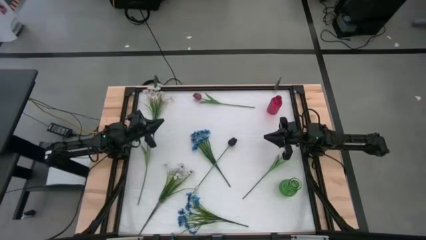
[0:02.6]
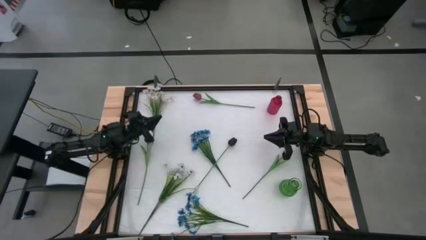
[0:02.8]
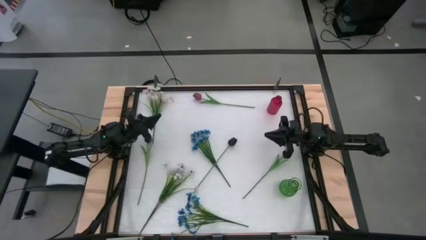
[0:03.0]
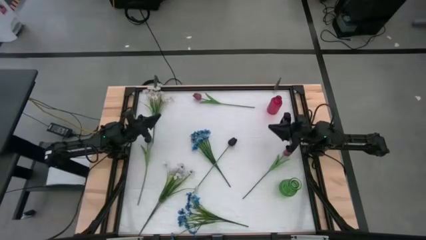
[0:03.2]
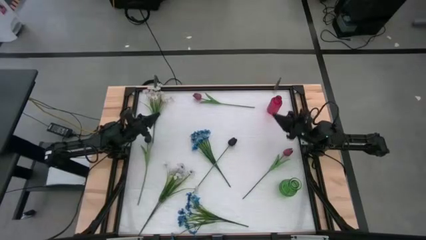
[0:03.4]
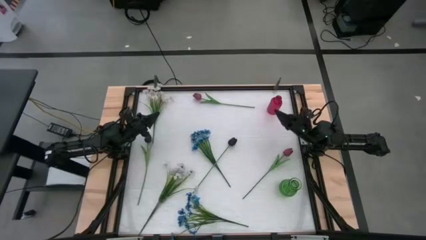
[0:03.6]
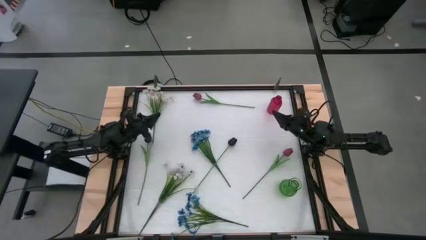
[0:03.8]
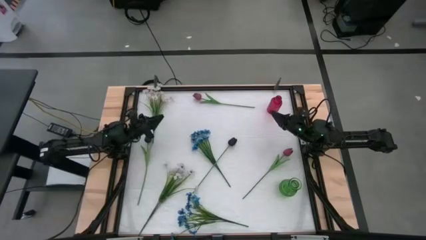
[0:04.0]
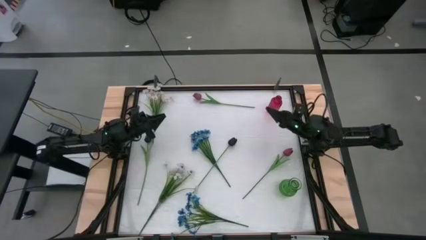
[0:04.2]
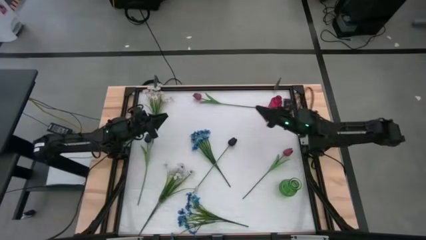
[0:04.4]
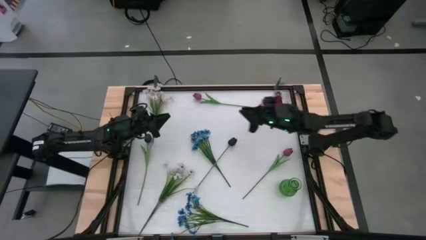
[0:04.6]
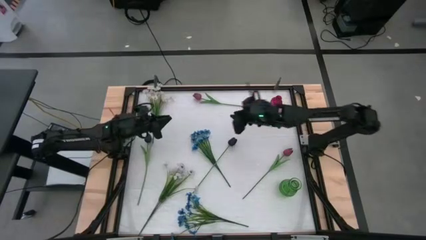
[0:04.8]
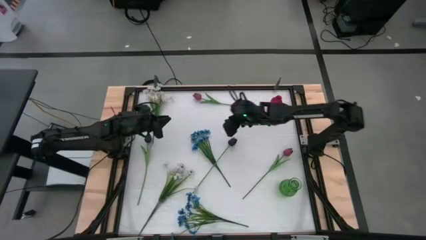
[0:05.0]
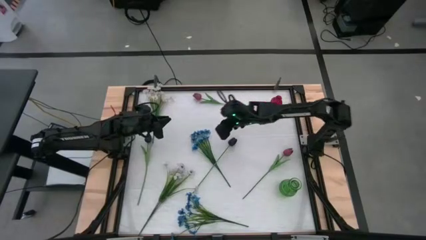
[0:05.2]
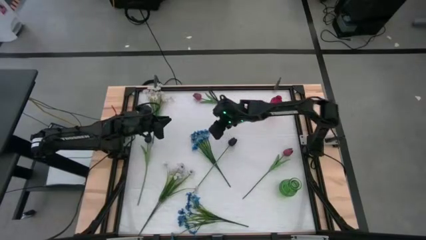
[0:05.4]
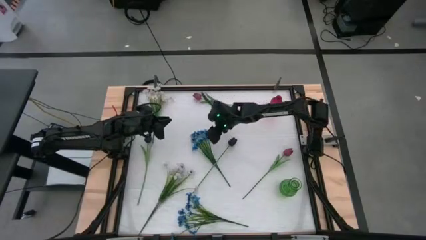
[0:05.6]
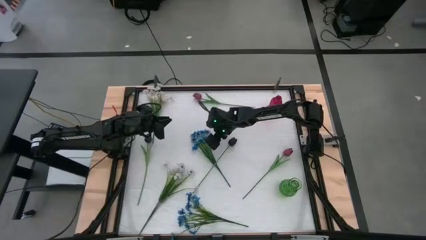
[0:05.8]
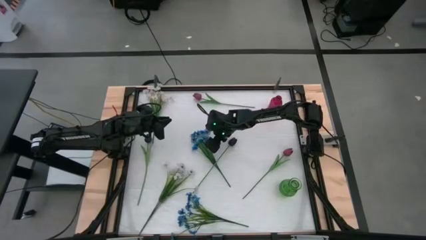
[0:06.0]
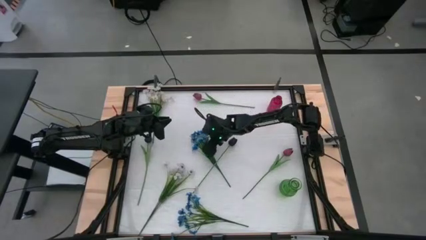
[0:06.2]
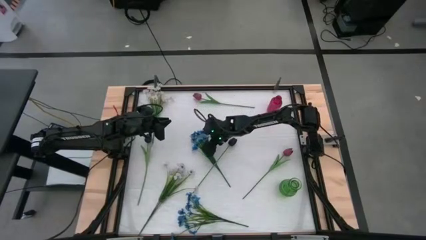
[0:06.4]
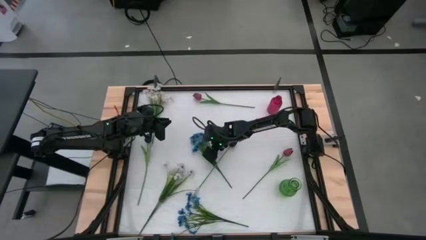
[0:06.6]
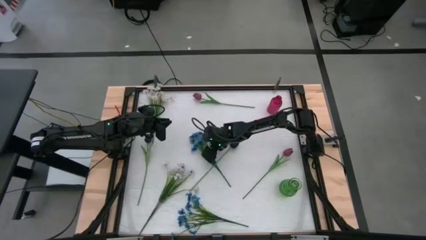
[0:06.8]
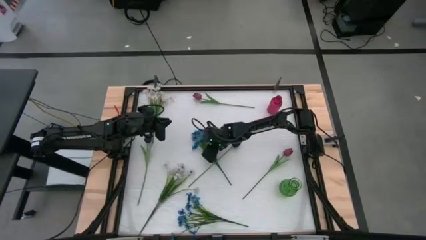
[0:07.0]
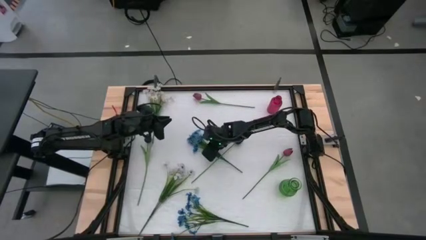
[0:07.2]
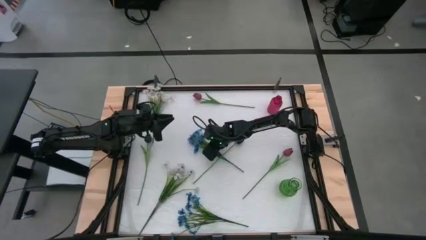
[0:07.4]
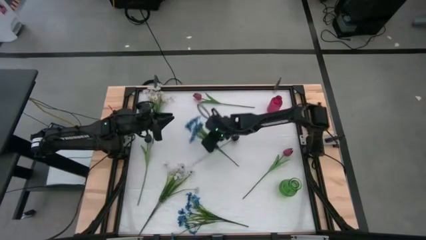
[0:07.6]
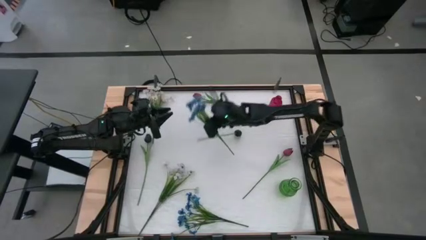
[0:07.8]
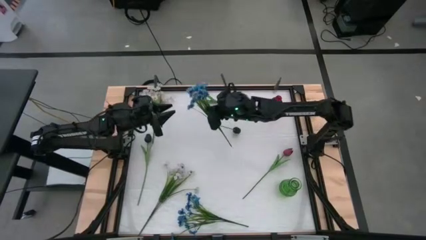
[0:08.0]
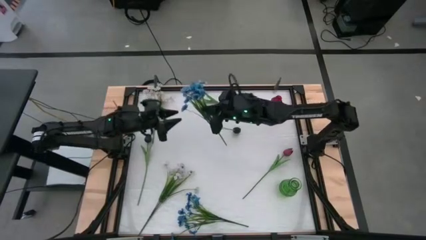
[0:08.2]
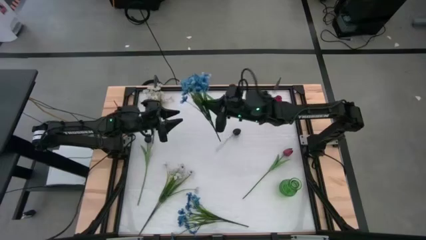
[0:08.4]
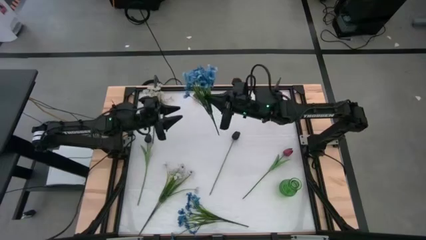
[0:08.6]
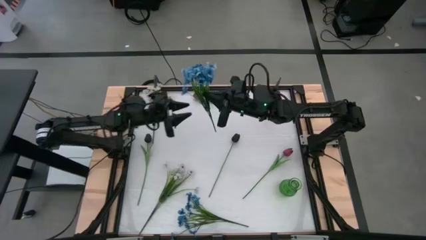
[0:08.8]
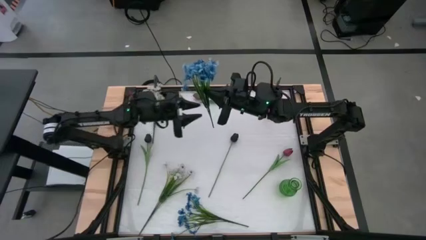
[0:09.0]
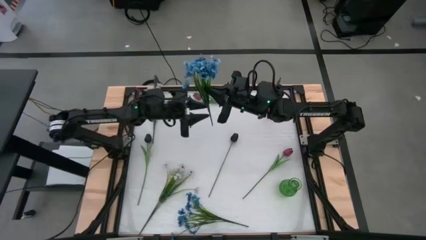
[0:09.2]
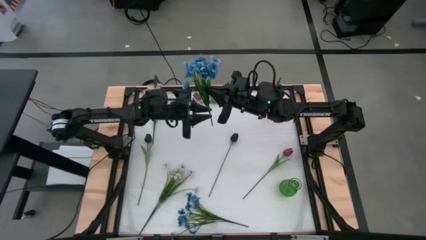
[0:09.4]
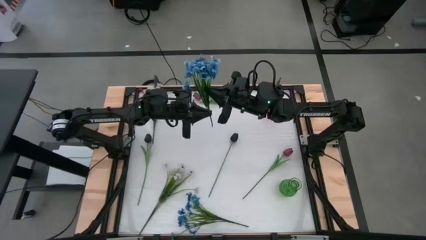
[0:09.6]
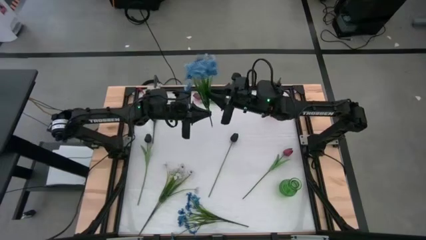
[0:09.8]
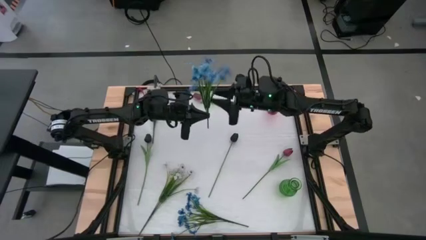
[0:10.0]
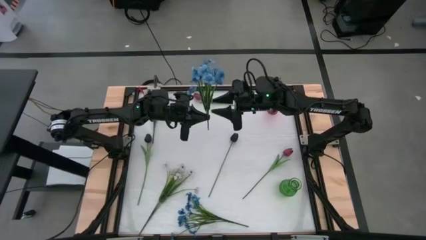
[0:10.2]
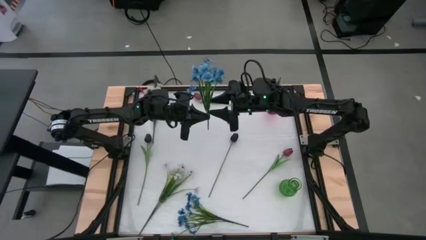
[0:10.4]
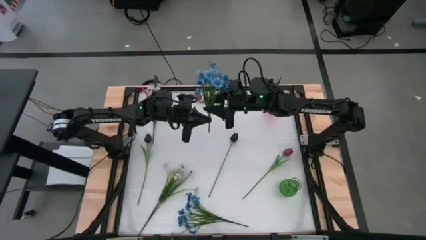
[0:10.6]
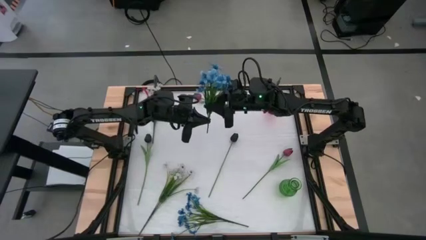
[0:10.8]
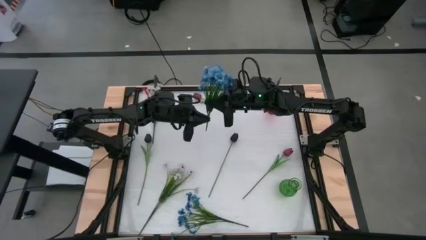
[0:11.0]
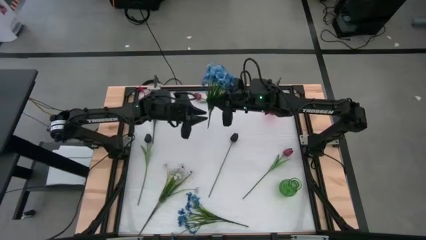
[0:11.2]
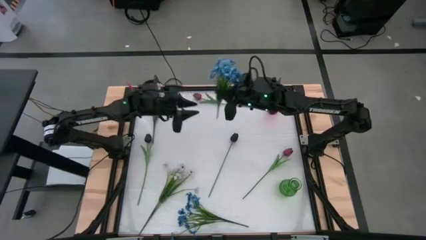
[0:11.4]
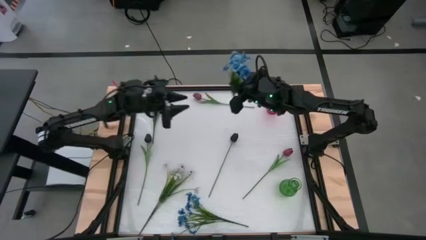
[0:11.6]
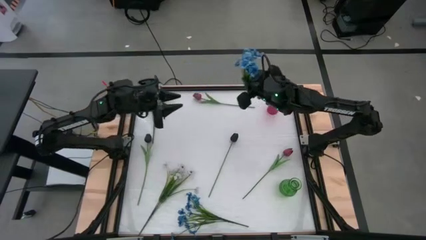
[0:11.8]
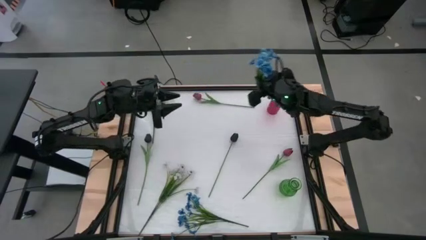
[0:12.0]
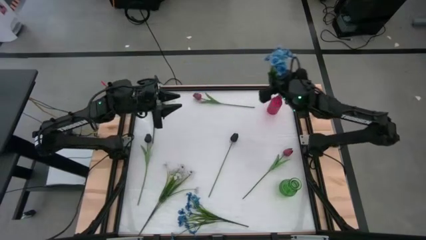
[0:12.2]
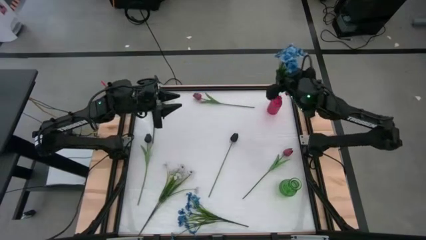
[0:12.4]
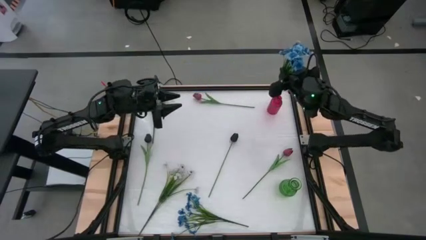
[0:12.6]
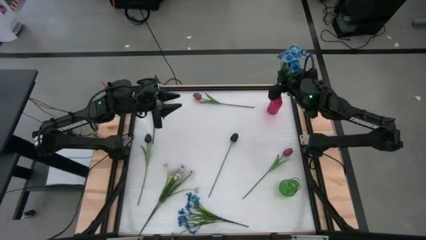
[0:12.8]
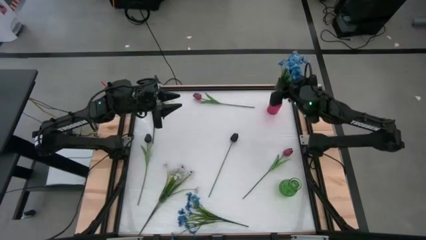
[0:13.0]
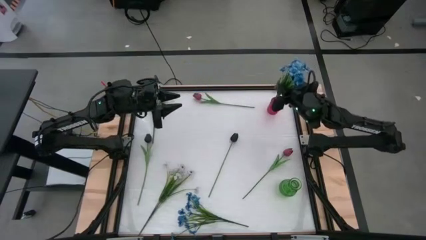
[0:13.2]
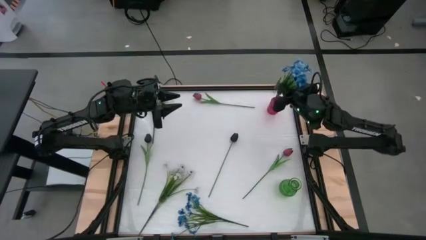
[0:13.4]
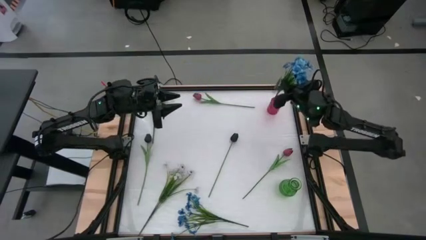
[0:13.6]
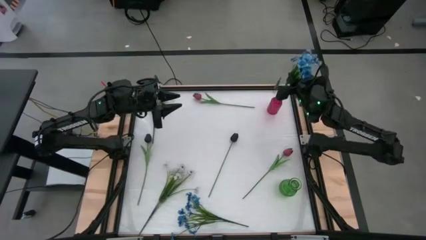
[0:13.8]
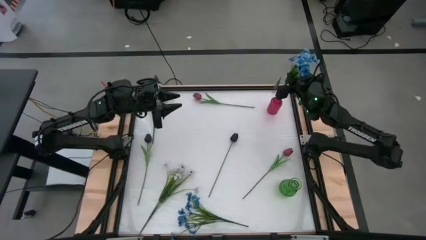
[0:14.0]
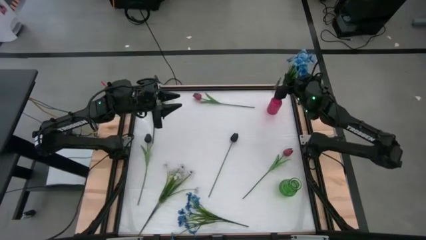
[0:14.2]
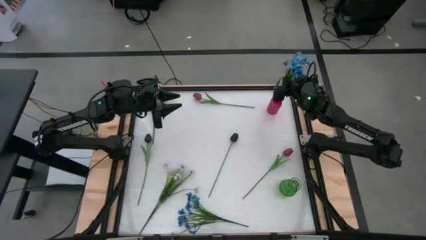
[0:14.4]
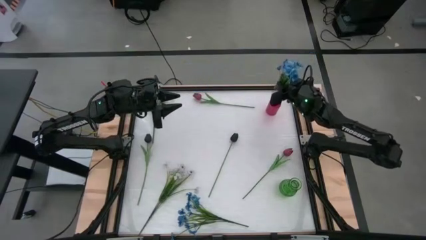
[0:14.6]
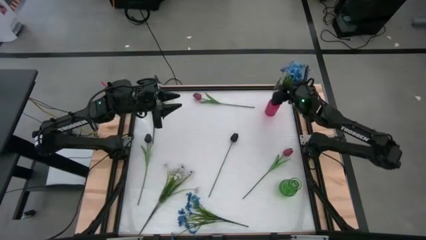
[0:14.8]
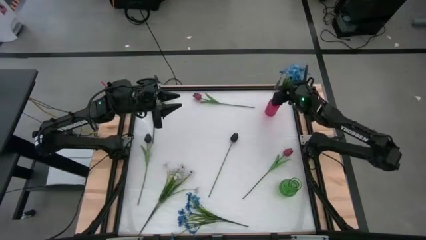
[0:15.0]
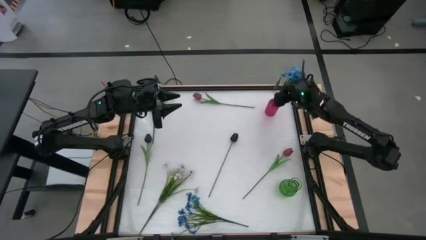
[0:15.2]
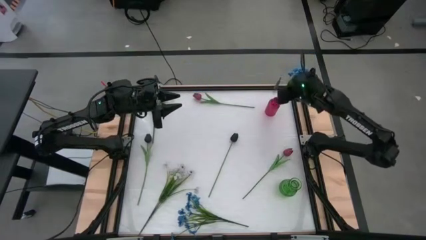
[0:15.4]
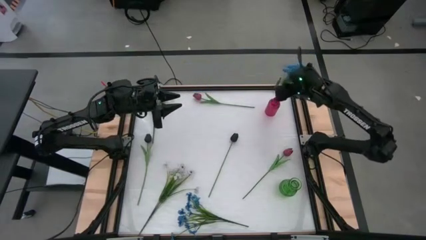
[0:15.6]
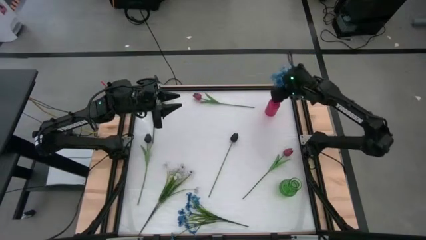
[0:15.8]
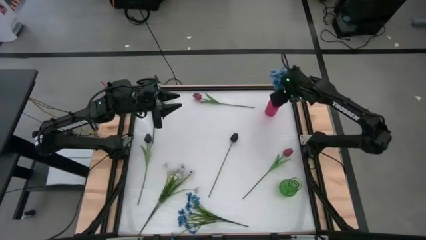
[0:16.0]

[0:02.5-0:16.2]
Task: Sort flowers into vase by color
Put the top blue flowers into the red vase
